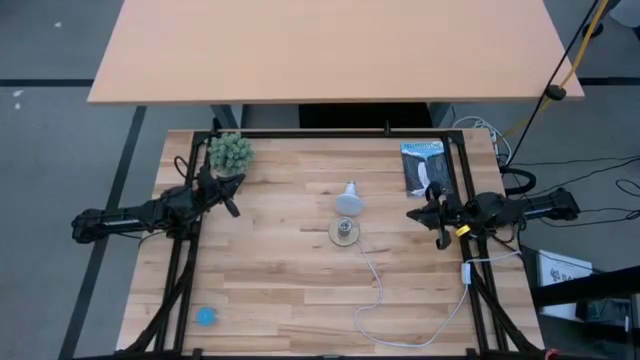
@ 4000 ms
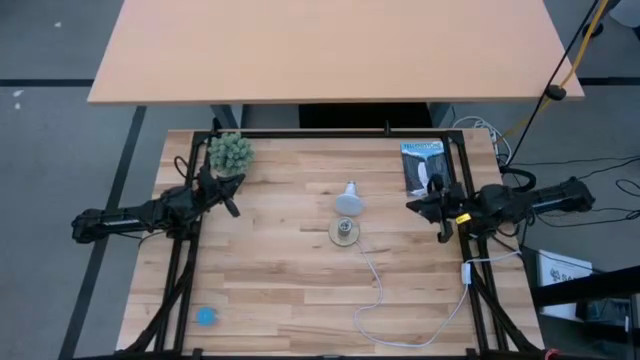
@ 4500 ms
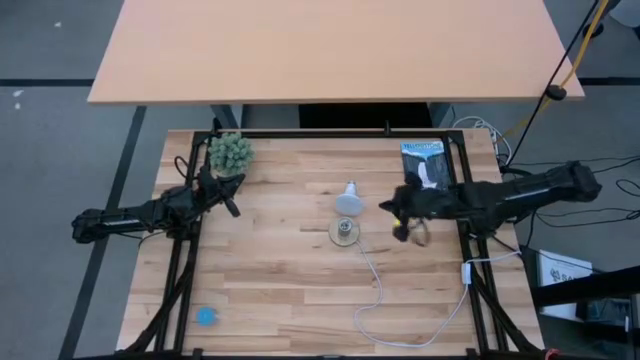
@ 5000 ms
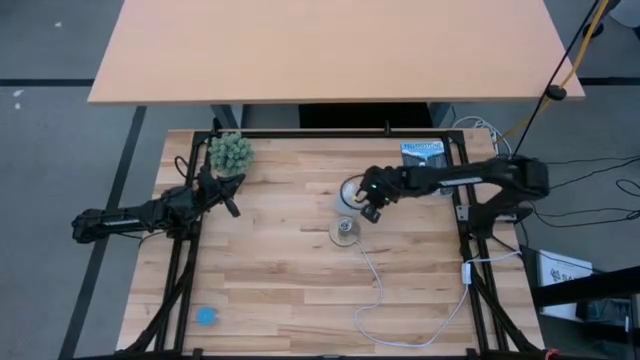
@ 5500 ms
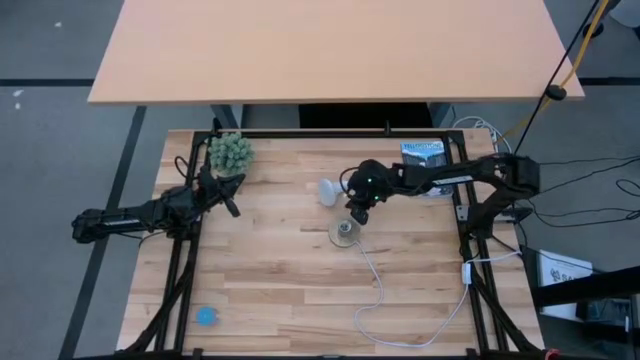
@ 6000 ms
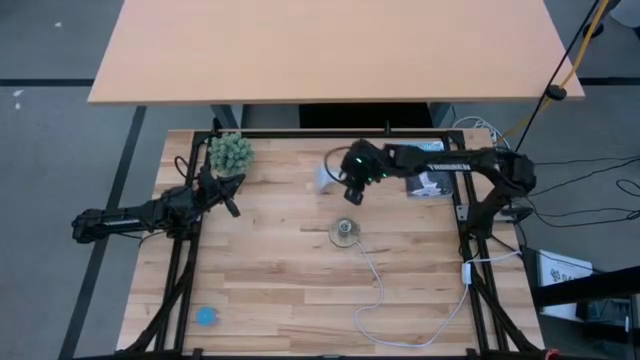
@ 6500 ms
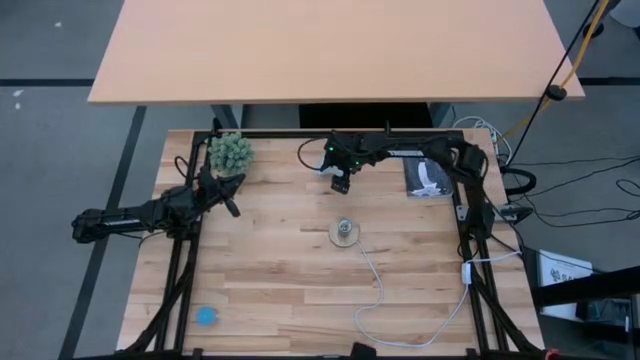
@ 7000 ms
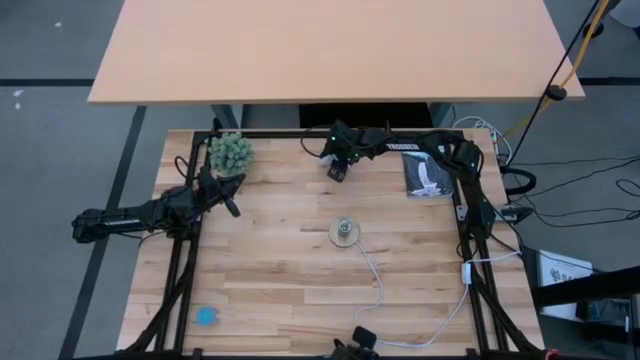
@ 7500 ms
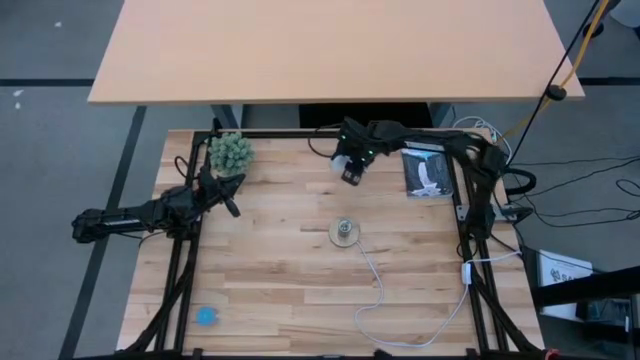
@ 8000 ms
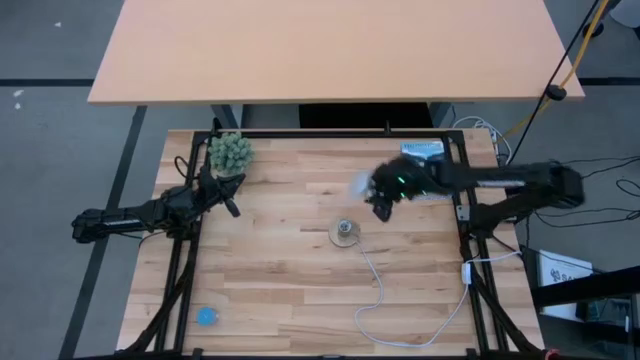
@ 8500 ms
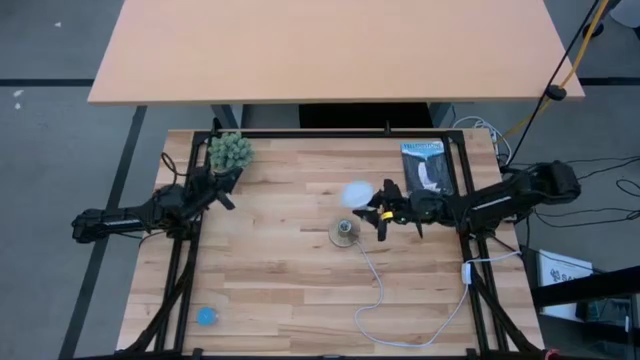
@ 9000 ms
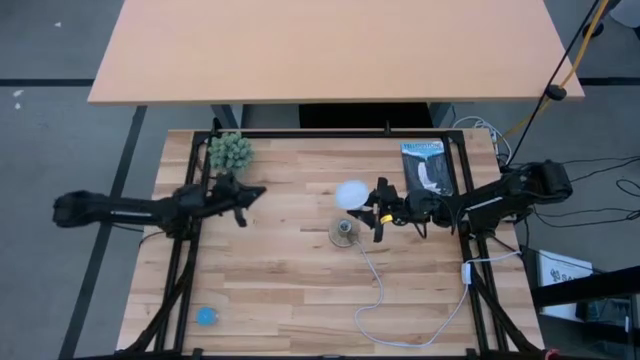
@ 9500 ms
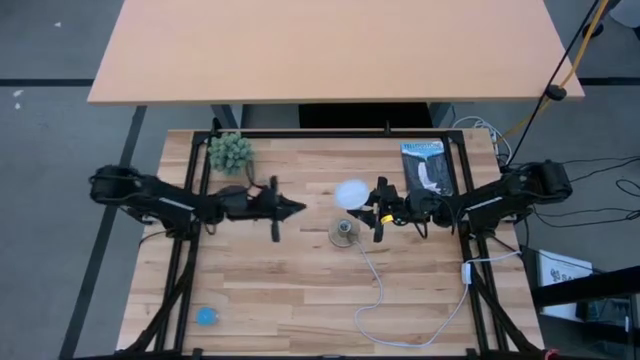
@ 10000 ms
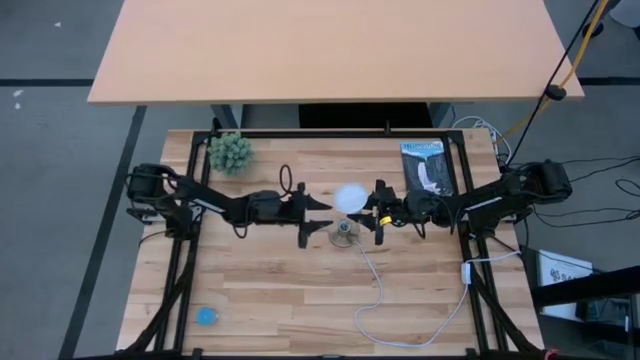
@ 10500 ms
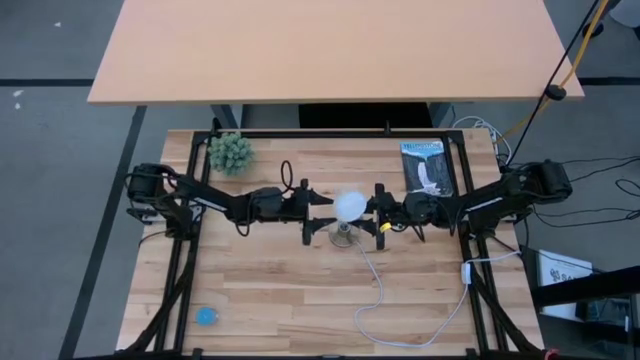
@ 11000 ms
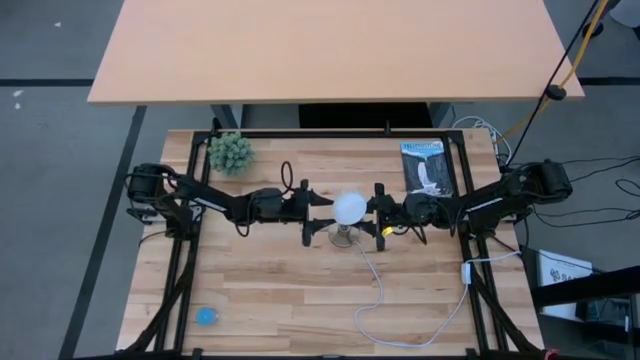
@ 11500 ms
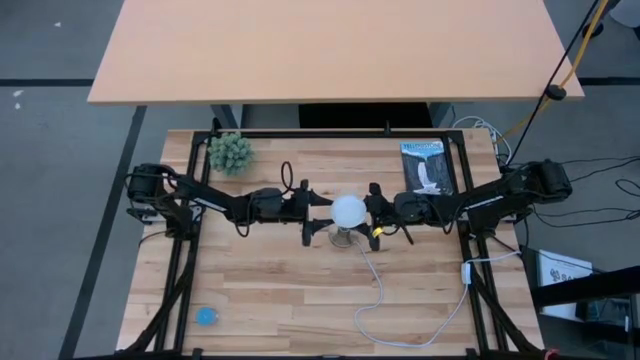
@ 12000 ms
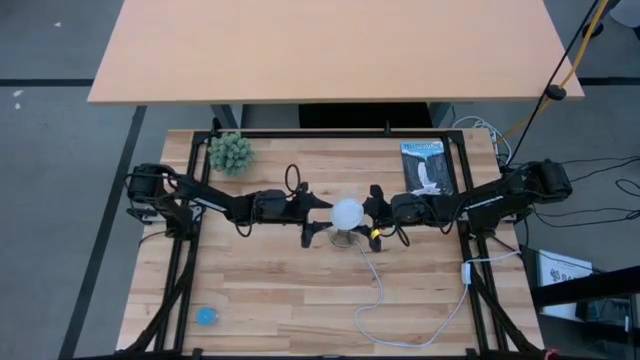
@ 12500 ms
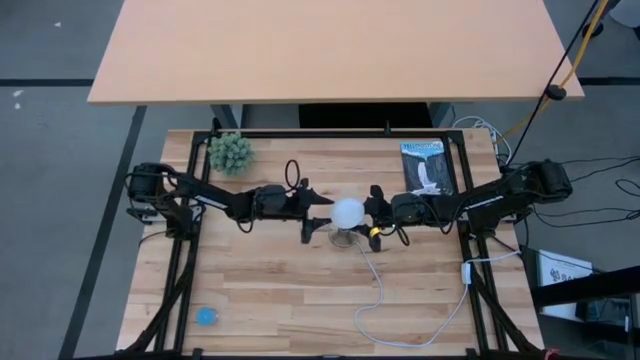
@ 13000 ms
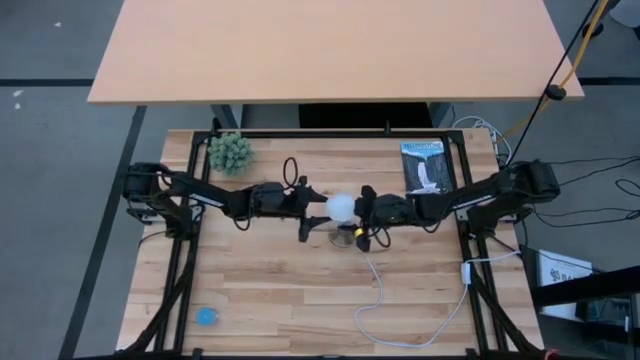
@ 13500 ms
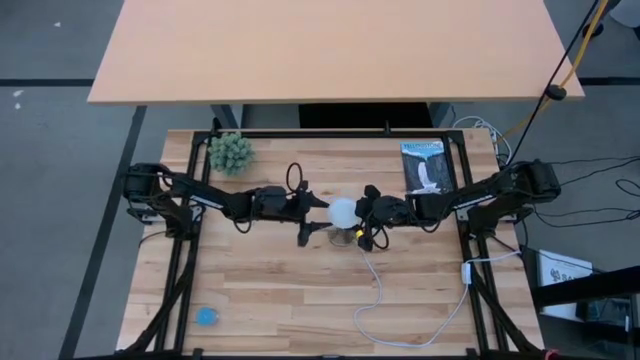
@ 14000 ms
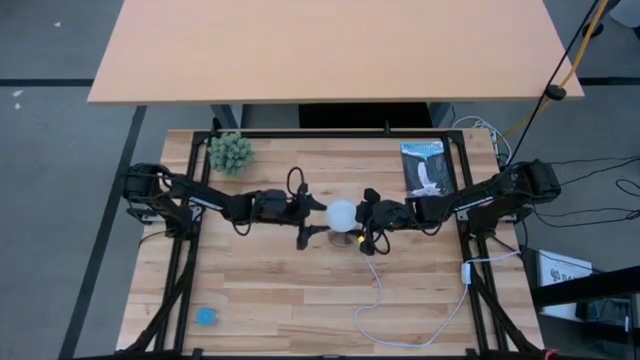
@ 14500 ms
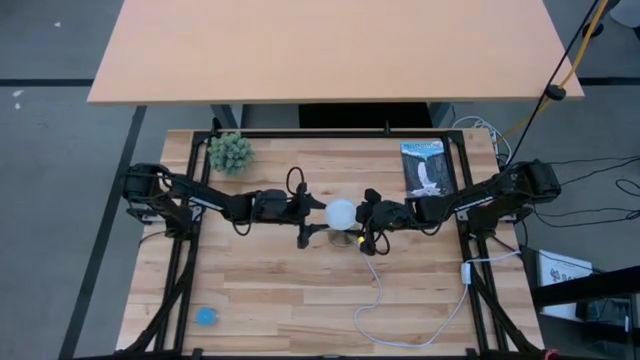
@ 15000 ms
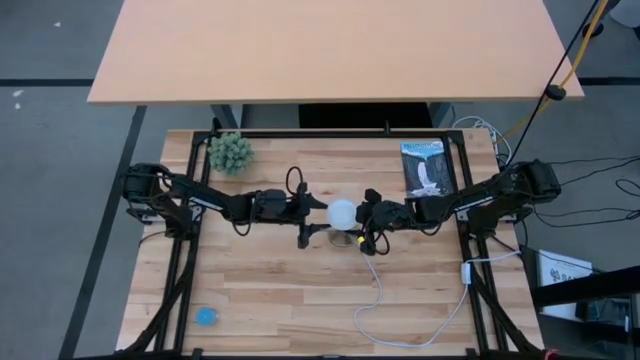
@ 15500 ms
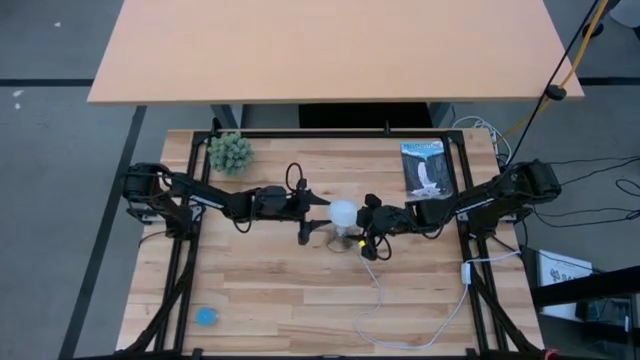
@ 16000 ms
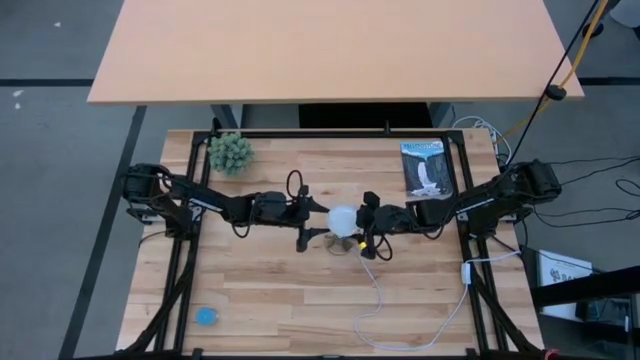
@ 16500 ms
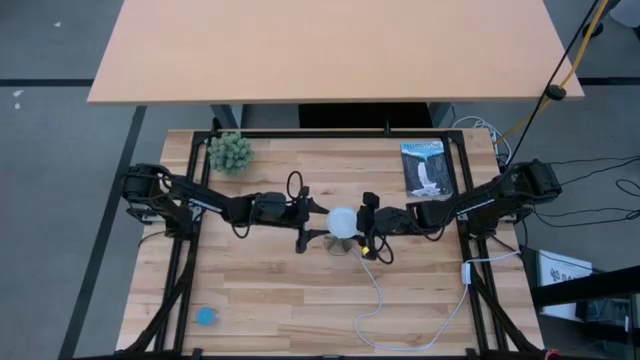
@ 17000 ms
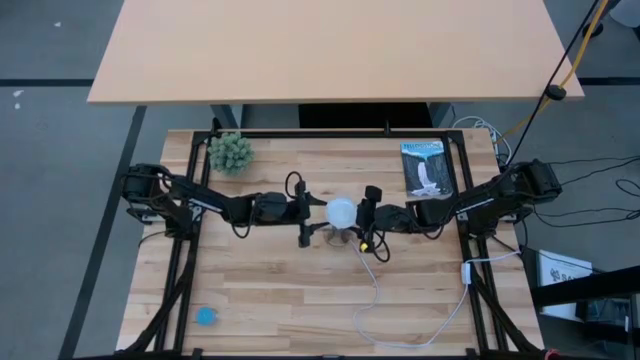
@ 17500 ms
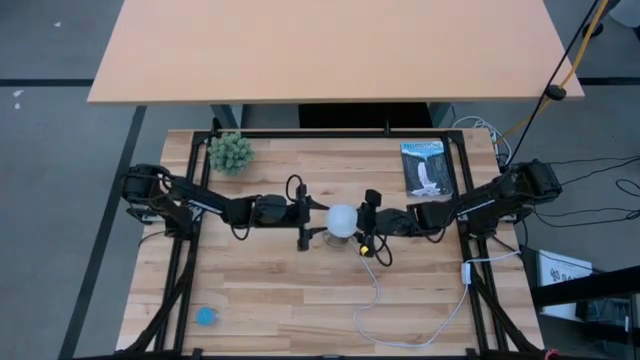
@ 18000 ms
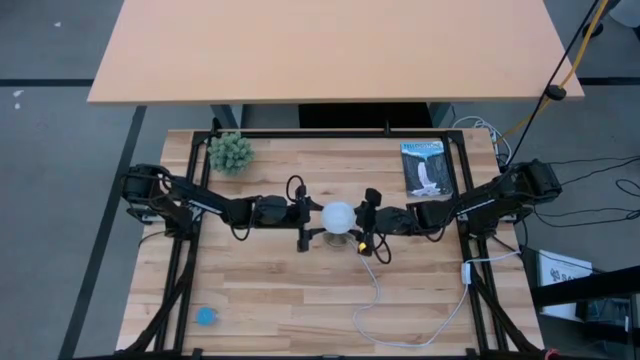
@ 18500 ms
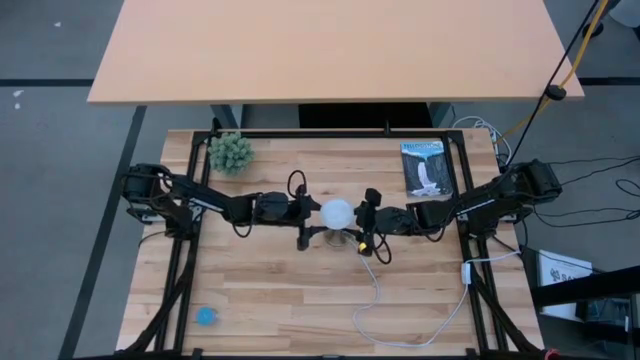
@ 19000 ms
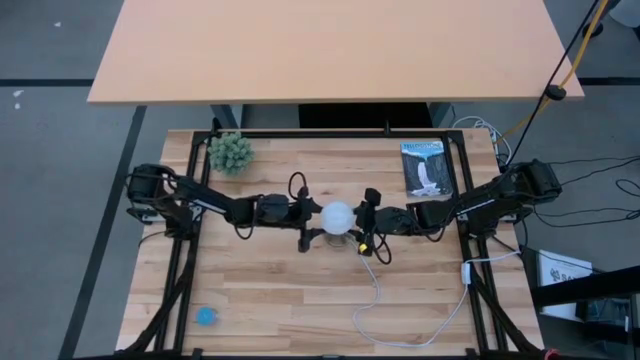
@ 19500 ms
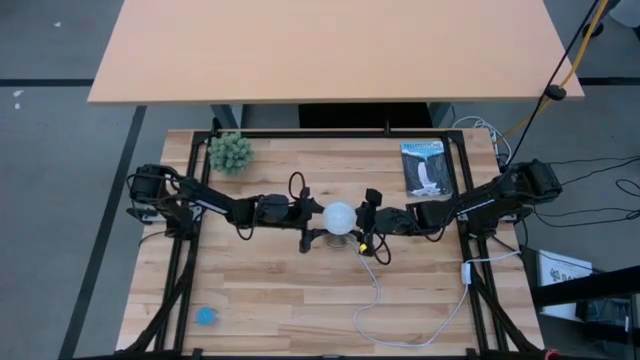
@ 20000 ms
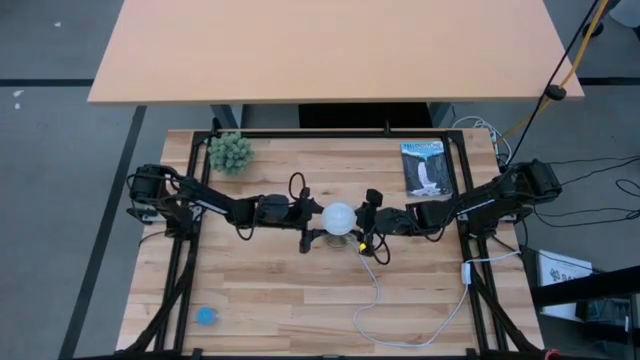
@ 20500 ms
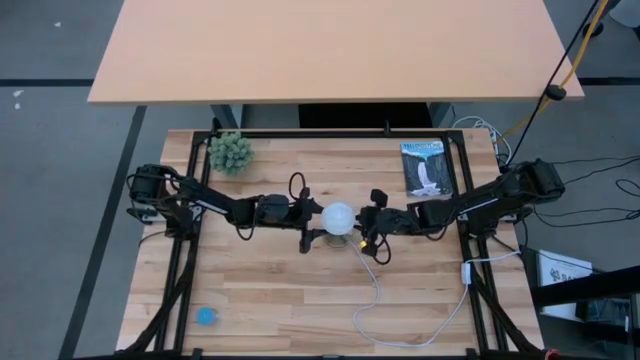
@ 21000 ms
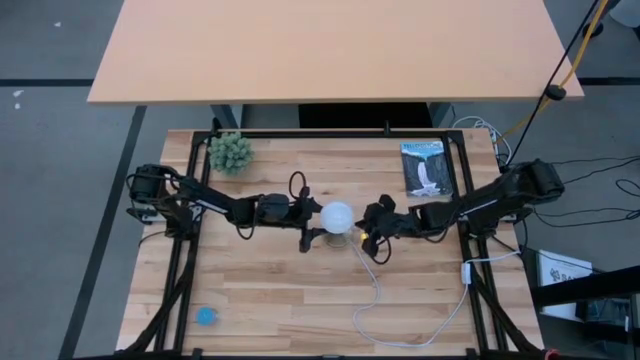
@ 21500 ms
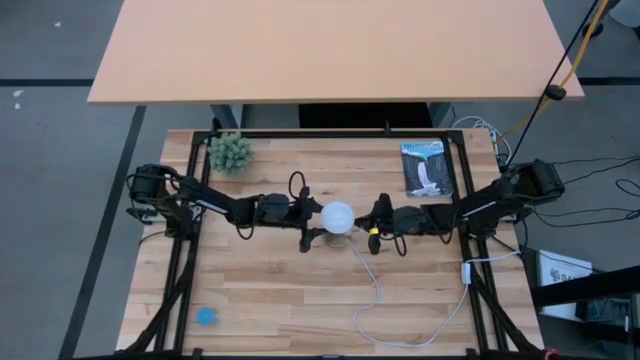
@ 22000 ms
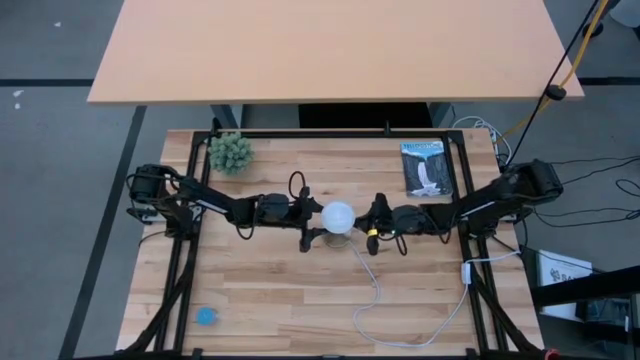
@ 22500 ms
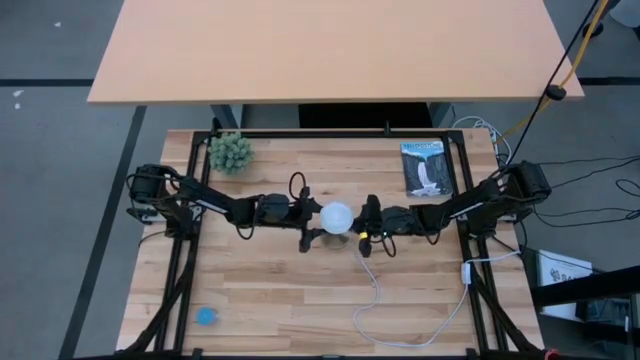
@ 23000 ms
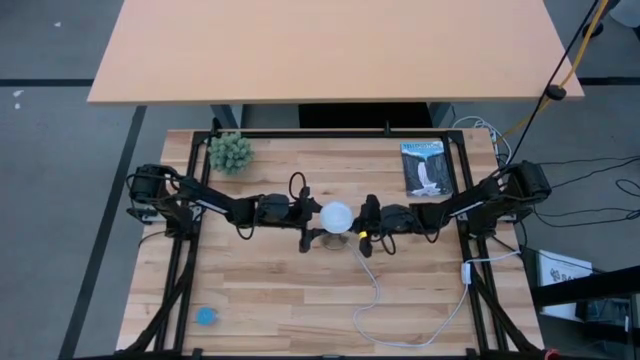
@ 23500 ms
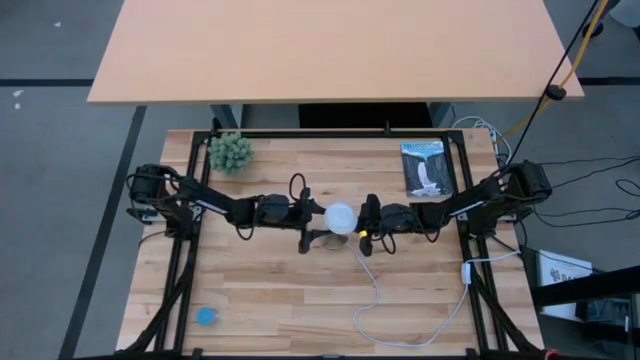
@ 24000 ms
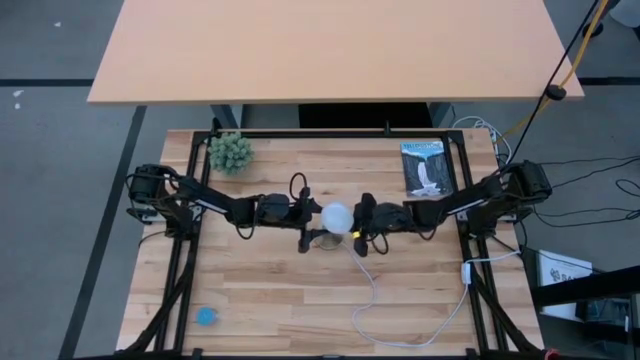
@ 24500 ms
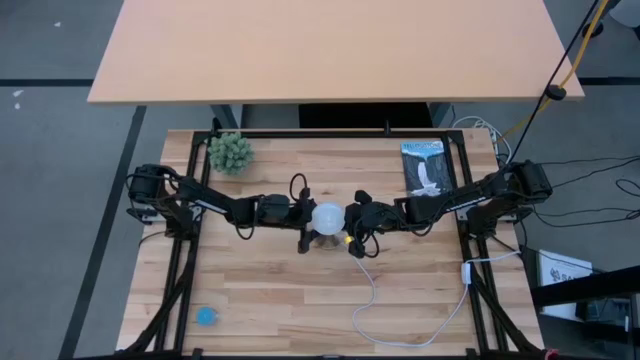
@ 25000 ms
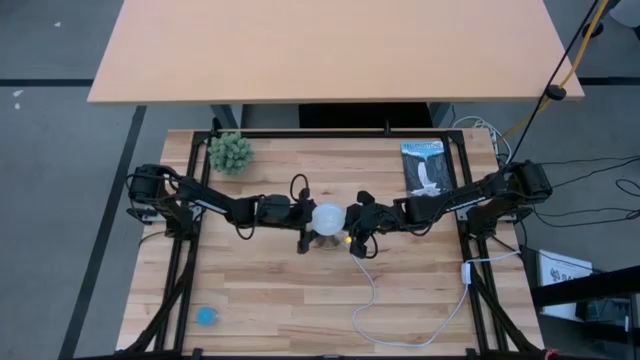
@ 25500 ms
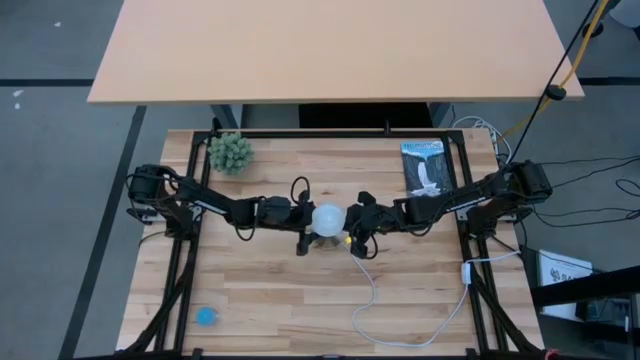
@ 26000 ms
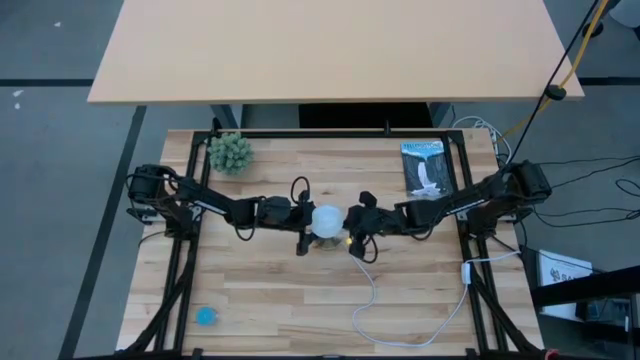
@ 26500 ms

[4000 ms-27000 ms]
Task: Screw lightbulb
Insert the white light bulb into the gold lamp
